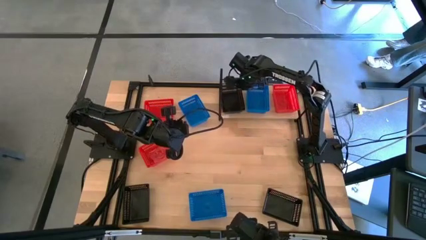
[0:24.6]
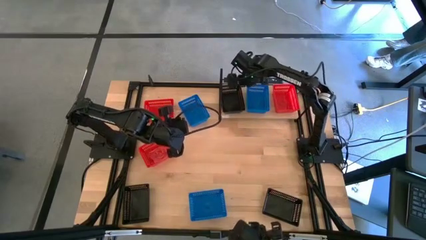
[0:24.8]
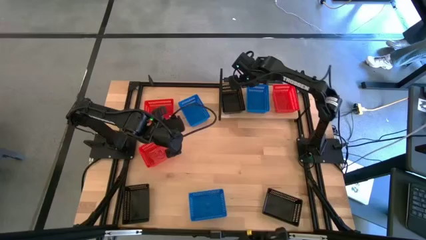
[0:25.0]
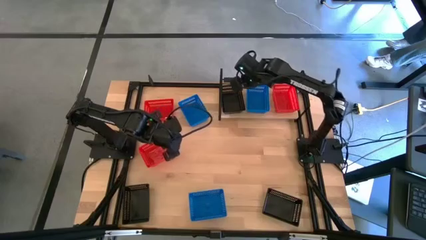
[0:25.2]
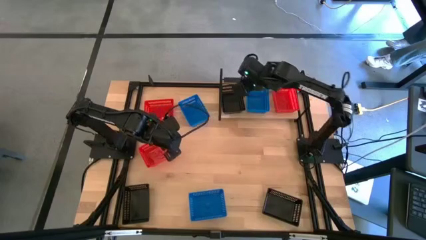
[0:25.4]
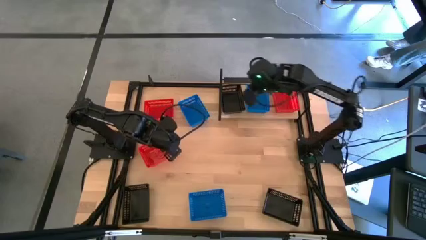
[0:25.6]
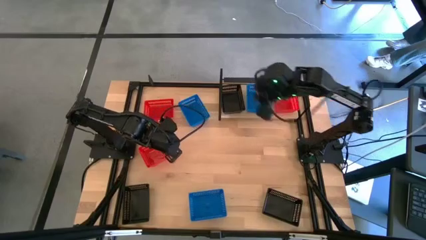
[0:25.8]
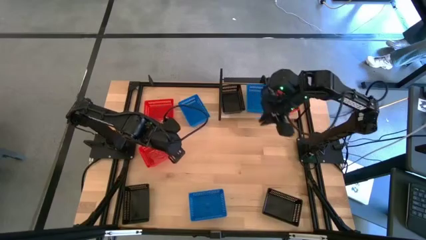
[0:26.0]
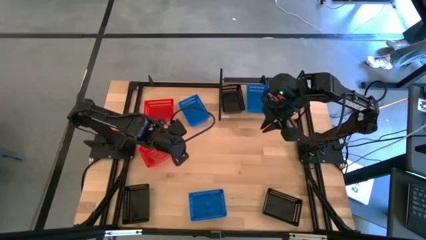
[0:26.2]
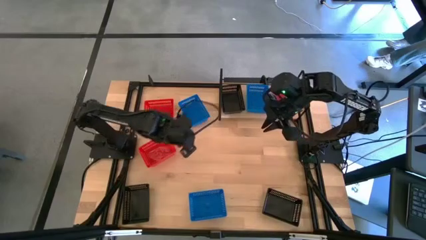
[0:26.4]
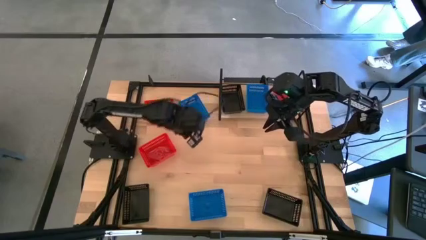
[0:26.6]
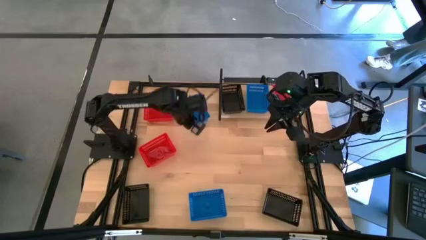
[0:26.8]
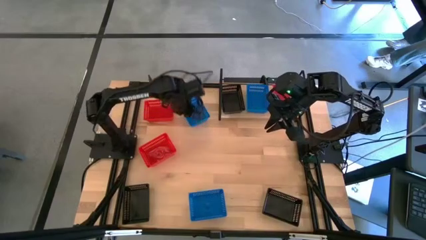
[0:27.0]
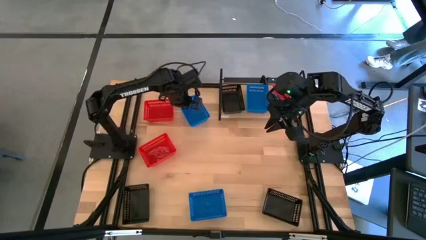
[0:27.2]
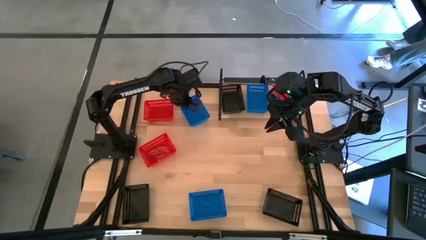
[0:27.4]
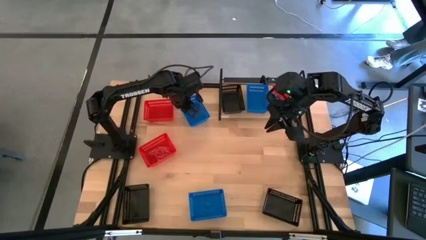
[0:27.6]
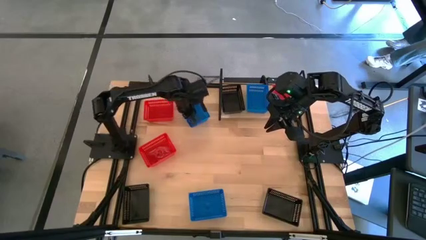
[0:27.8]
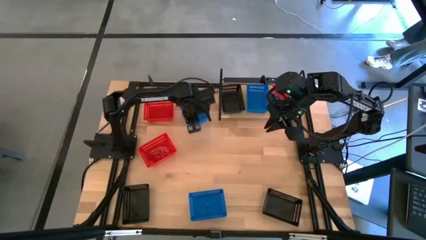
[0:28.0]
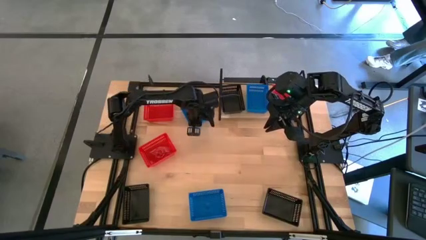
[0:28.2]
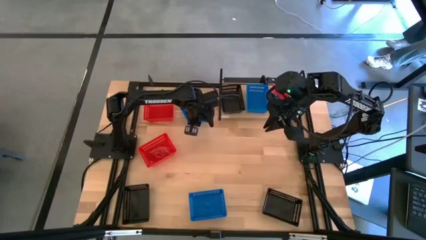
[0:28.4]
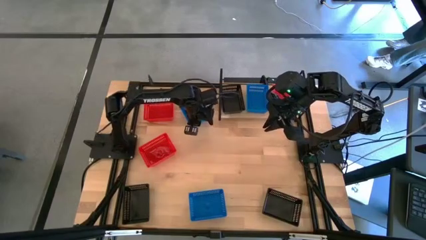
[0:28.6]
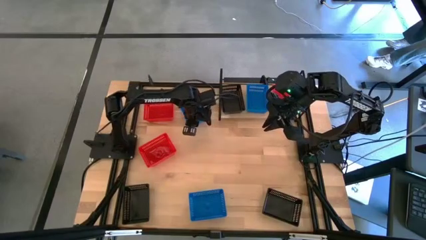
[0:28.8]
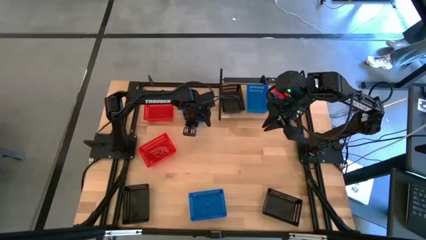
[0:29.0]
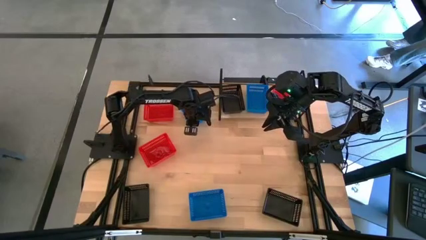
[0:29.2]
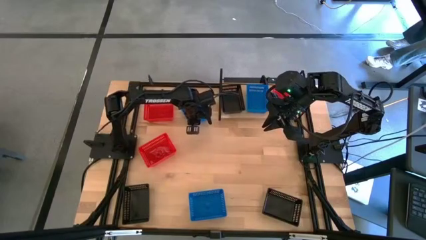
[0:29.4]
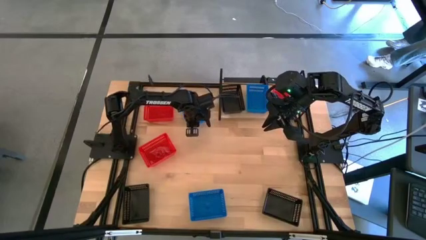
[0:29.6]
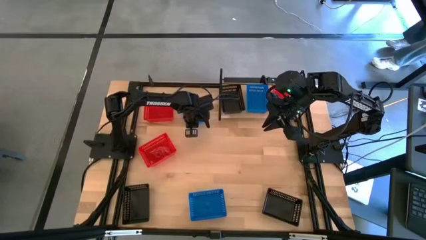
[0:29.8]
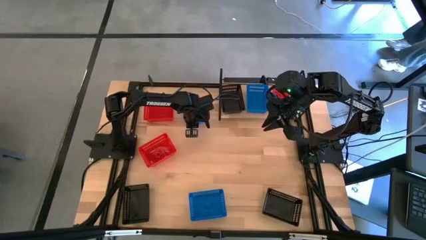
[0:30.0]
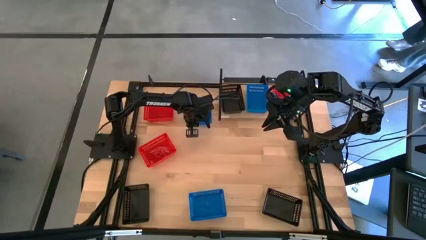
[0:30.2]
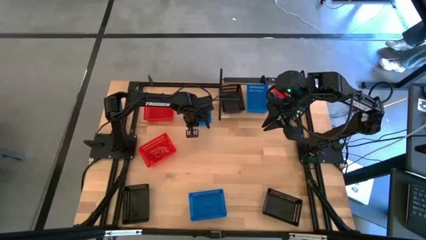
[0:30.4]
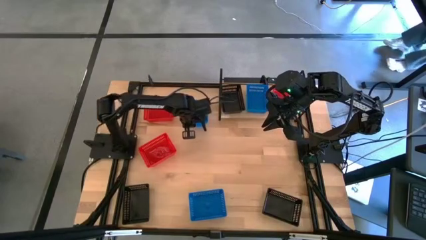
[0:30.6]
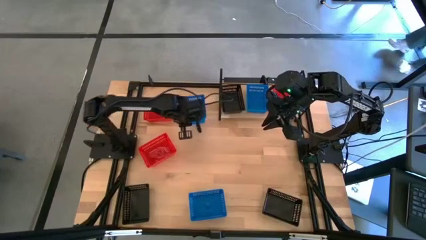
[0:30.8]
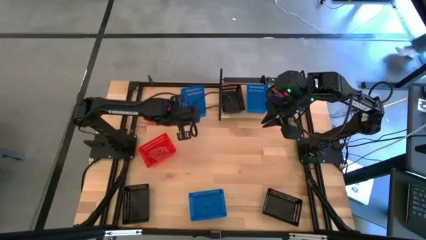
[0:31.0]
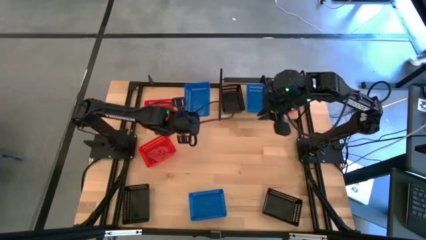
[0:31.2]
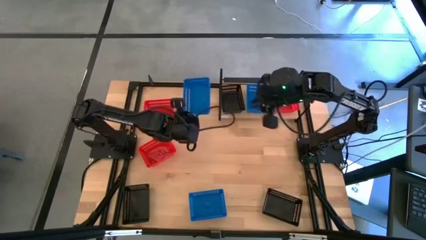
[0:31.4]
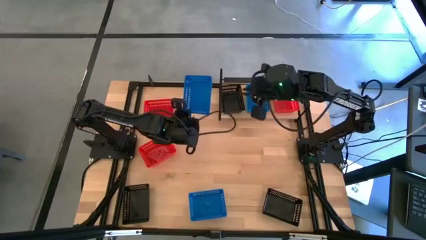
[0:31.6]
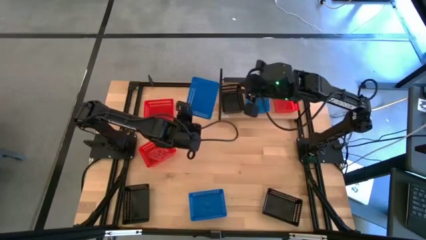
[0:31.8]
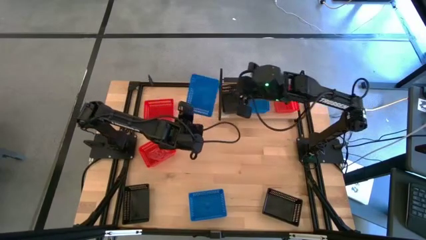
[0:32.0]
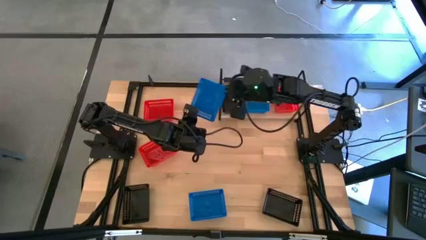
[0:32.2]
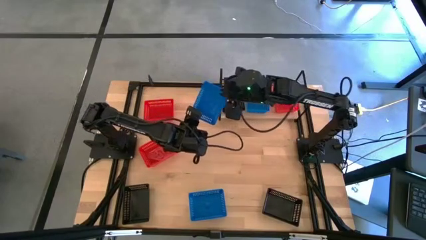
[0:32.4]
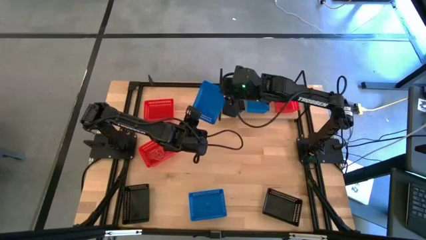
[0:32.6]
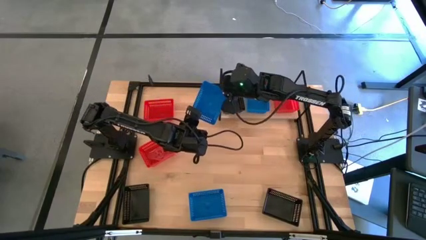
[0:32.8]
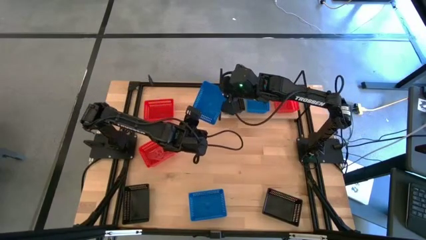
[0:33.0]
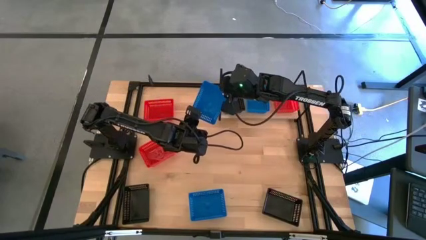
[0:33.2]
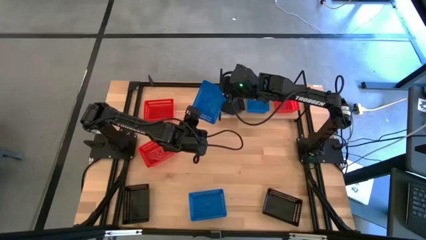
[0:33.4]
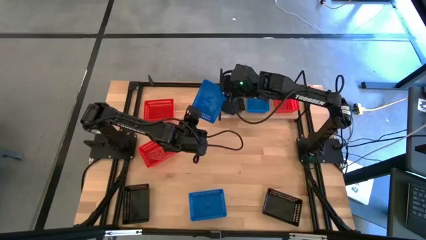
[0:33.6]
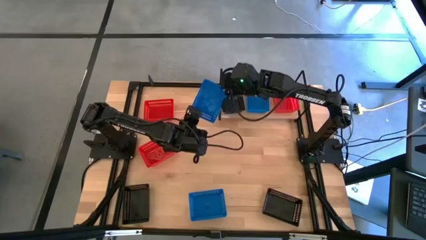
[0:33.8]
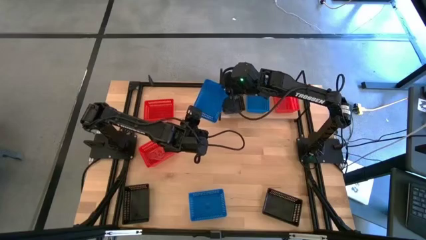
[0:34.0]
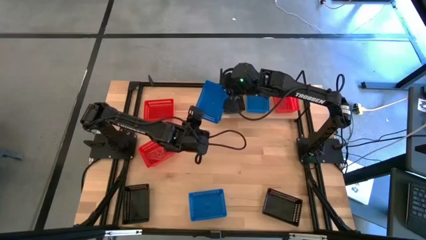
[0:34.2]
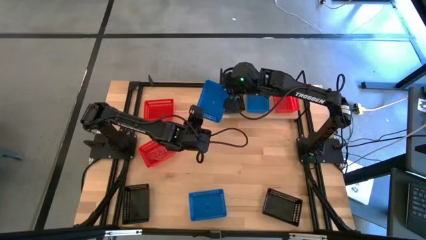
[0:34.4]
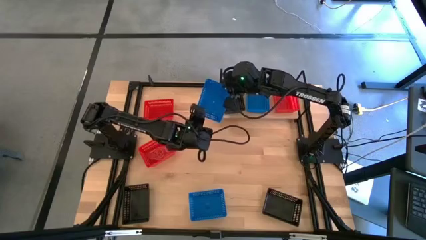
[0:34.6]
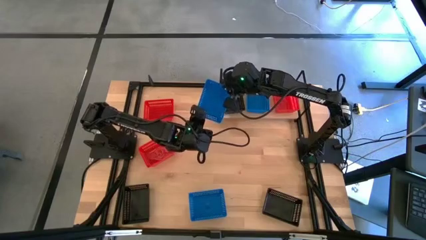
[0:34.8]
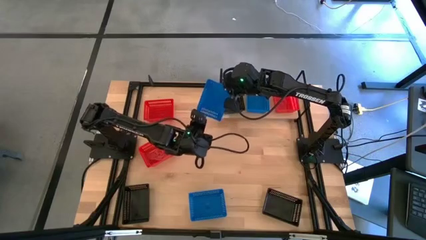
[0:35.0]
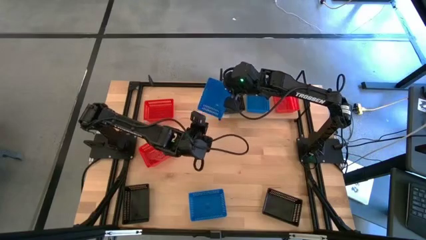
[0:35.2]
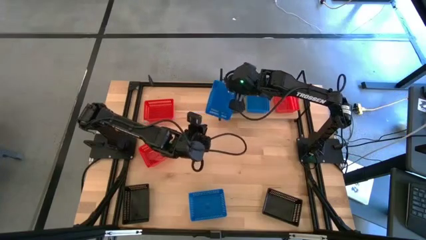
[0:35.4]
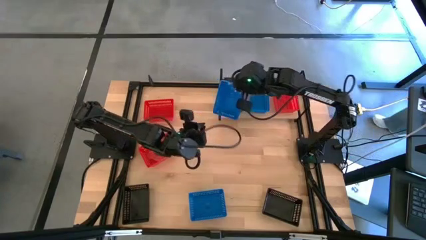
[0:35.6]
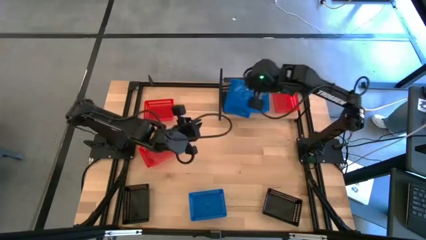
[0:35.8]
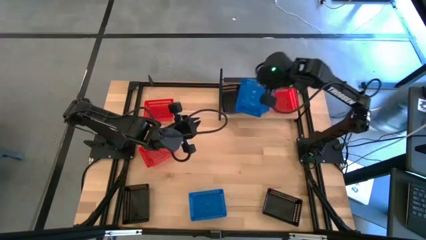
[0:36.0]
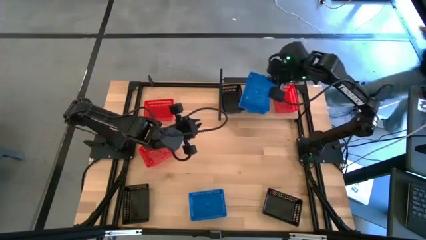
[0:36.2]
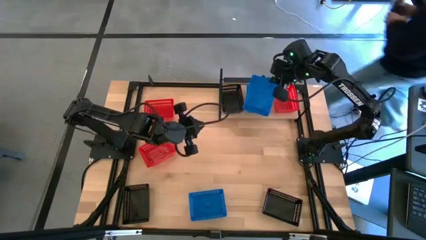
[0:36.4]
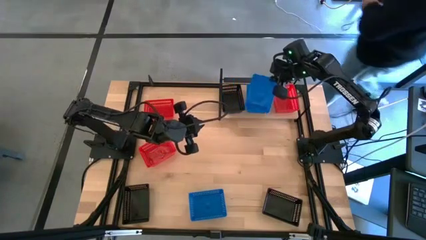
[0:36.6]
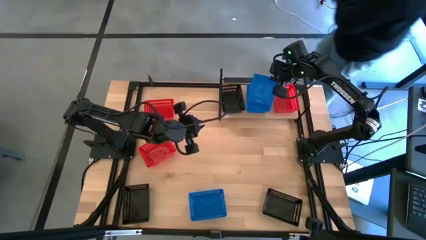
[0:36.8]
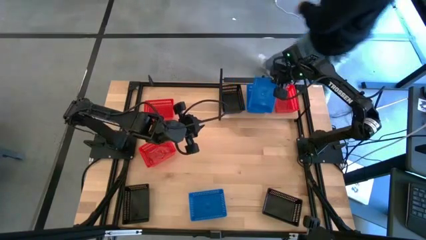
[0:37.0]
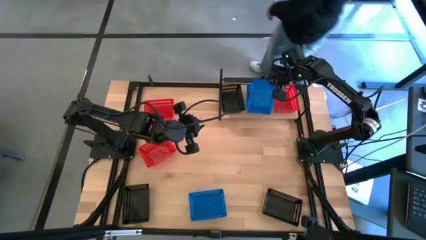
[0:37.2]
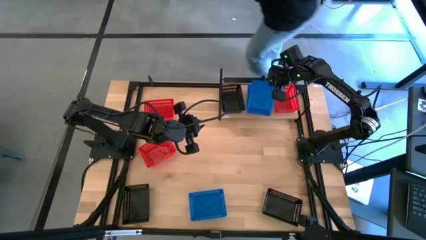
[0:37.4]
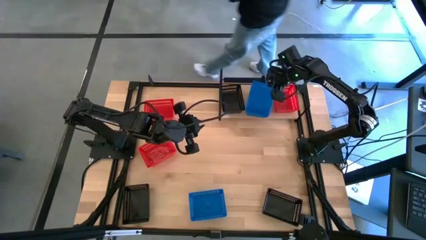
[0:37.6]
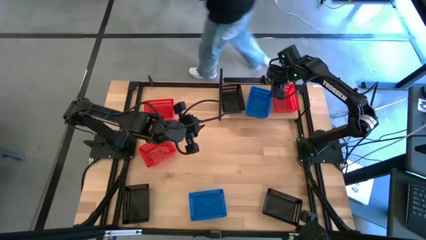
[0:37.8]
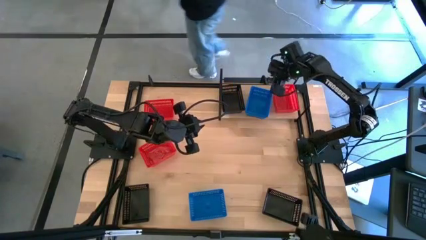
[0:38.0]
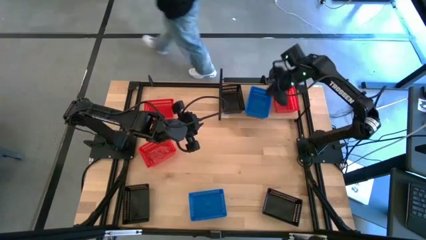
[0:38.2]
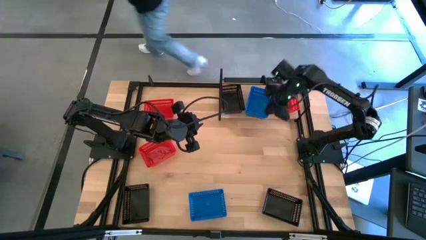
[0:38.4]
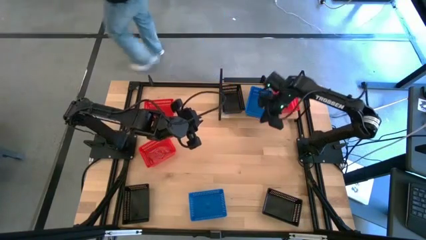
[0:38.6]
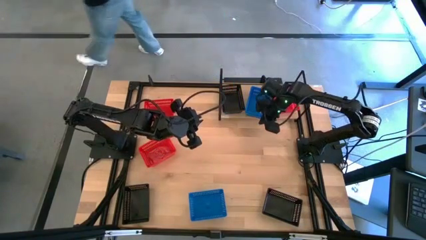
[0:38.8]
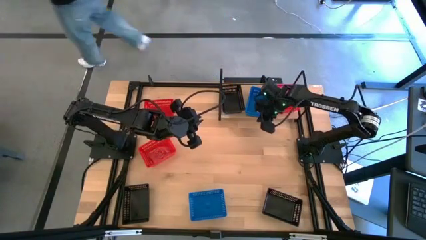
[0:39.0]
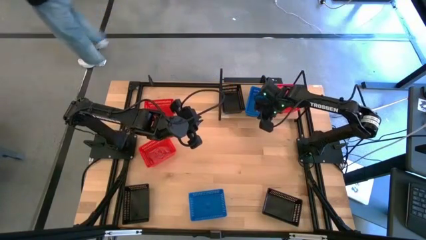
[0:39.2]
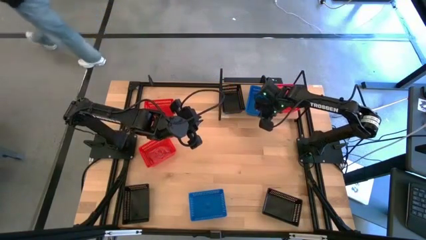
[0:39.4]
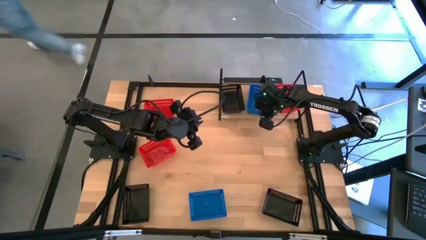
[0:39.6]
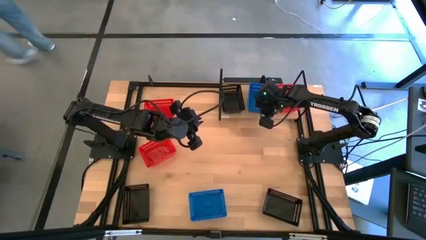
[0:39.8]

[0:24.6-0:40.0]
Task: Stack baskets on shelf by color
Stack the top blue bin on top of the other blue bin on the shelf

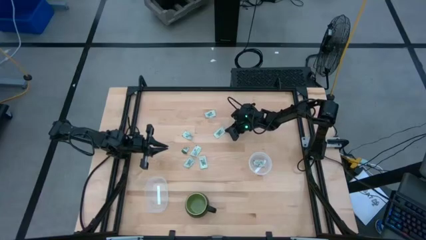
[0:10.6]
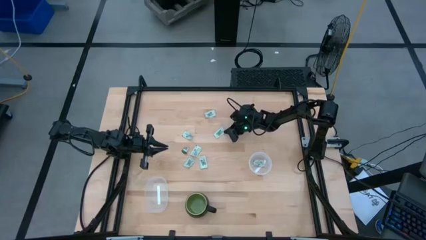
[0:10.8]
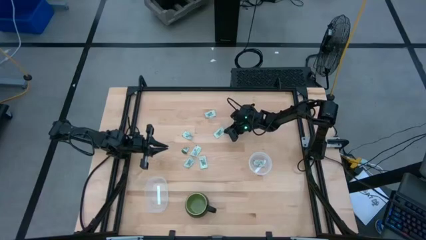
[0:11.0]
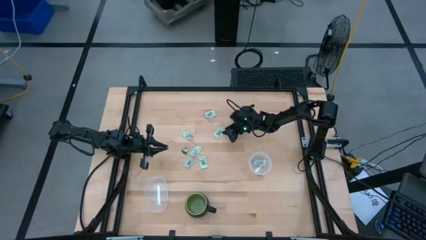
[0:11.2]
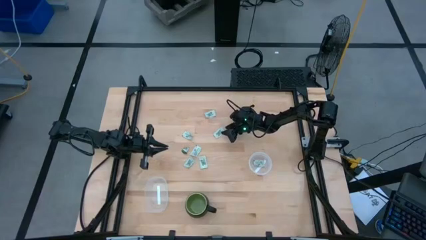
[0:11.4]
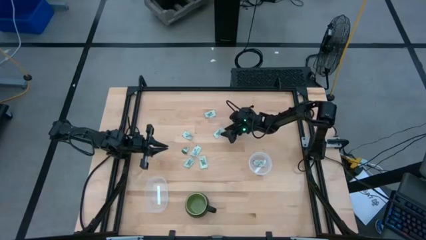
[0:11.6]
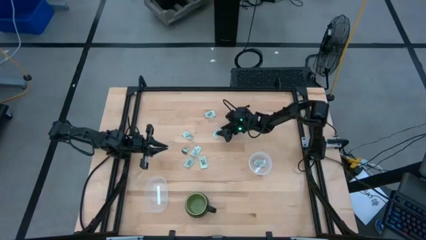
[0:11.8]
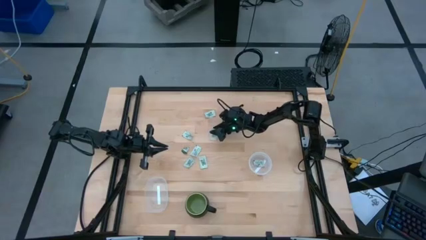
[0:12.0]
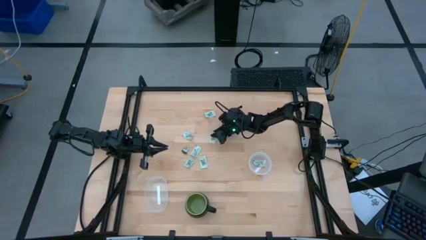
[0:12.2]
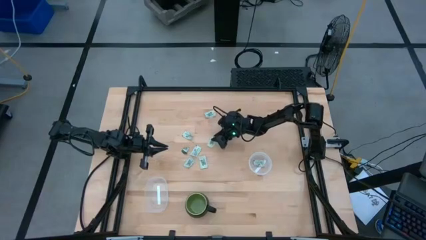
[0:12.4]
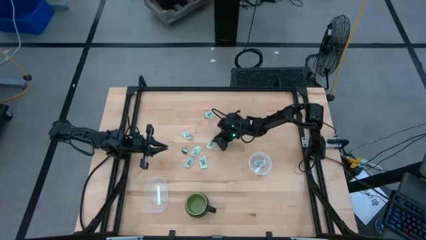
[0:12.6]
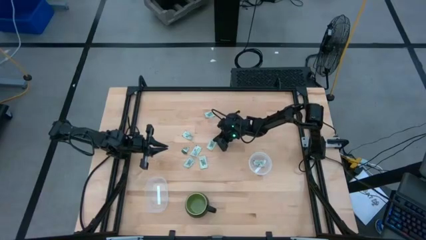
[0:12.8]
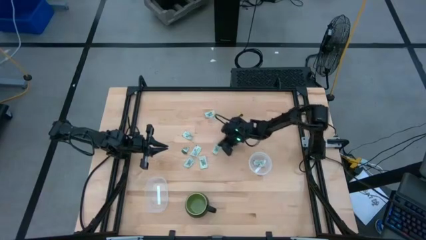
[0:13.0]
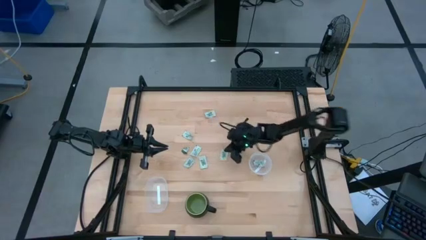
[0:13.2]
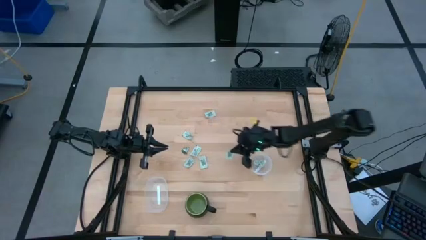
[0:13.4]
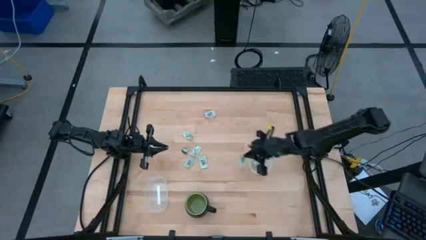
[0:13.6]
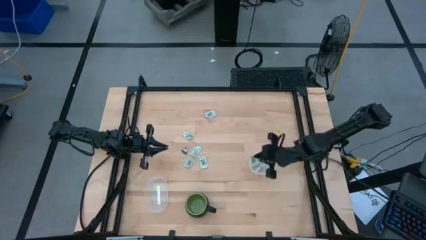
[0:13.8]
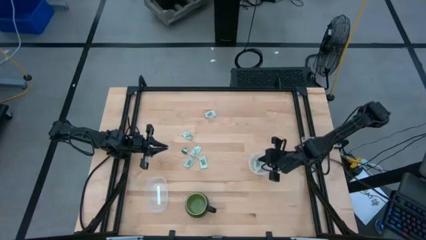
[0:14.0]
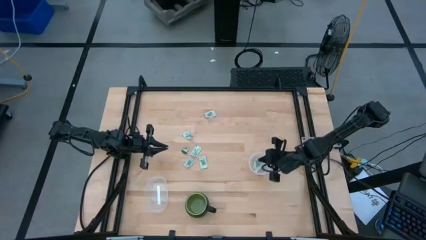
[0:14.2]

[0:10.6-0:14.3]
Task: Pick and place Stevia / Truvia into bins
Put the white stevia packet into the circular transparent container
